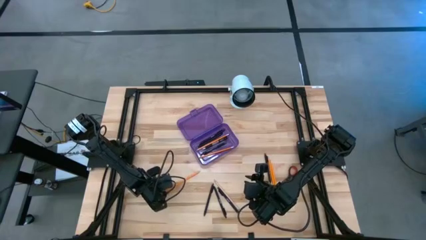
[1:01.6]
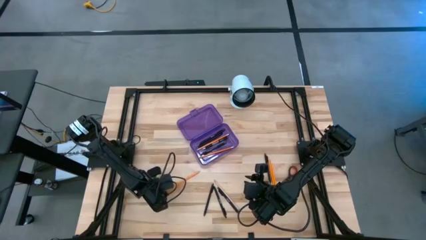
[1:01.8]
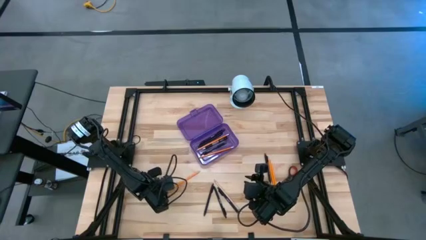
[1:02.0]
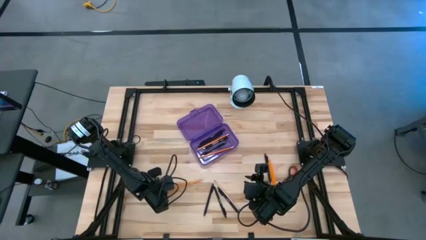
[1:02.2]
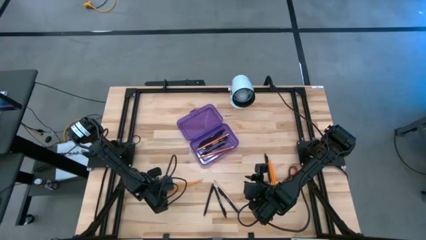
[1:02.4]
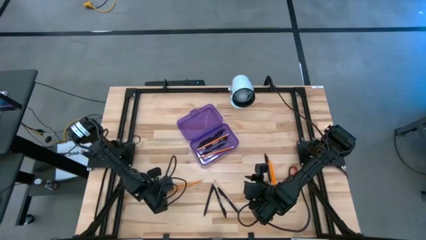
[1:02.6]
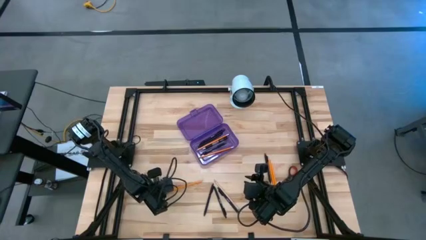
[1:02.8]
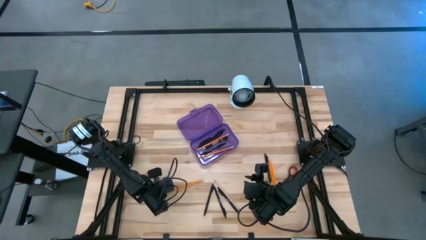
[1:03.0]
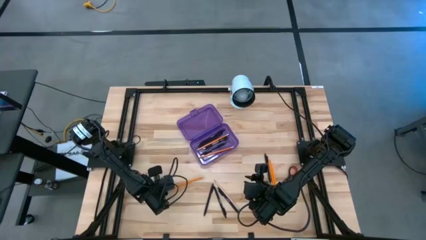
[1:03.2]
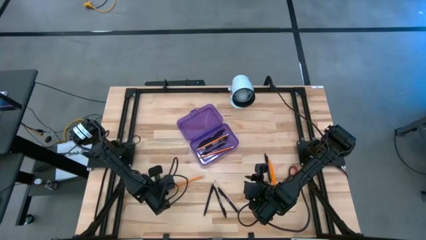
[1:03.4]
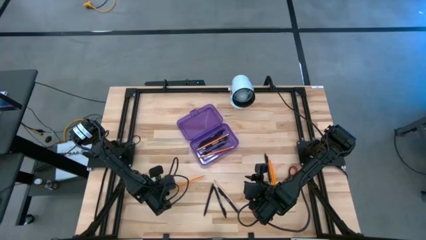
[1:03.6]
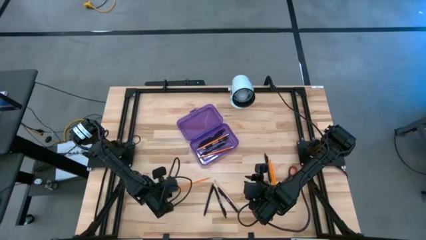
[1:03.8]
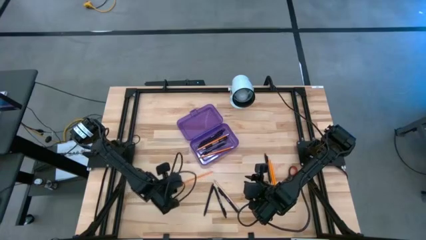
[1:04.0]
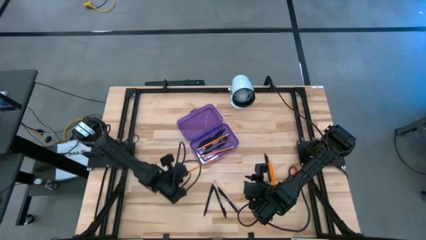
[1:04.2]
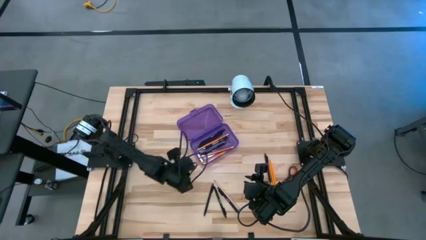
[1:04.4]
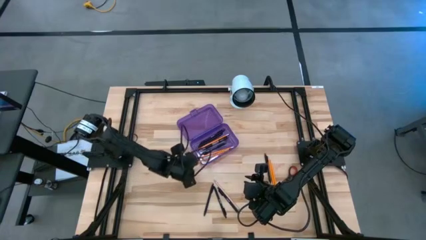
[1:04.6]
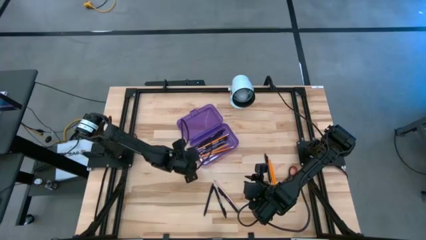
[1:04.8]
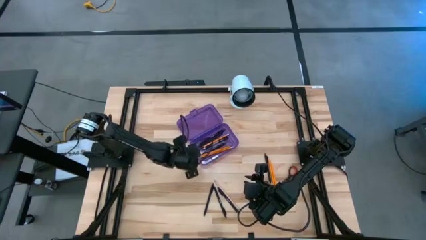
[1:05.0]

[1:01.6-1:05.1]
Task: Pick & place school supplies into a supply box
Put the orange pencil into the purple supply box

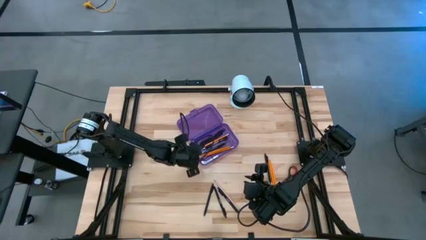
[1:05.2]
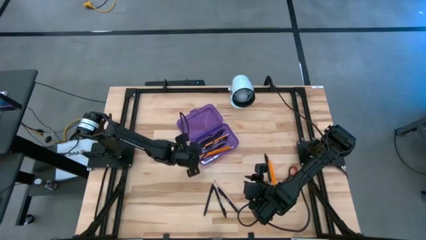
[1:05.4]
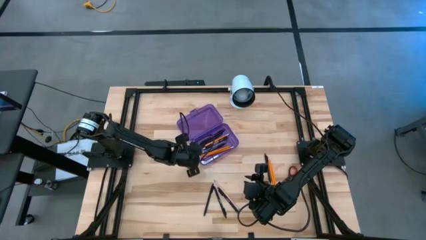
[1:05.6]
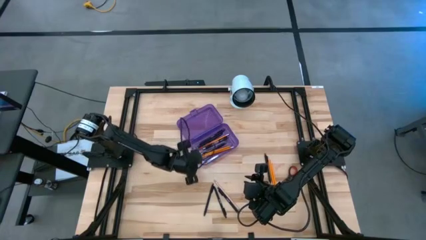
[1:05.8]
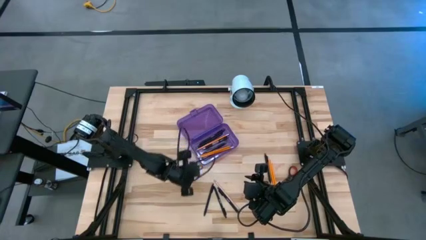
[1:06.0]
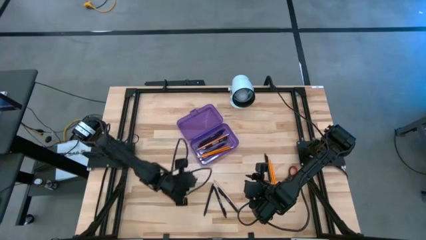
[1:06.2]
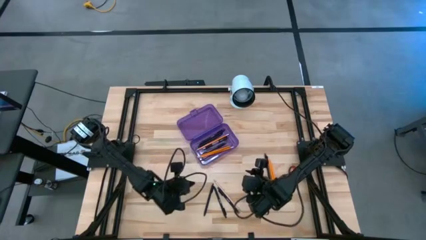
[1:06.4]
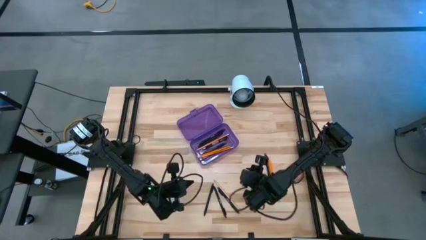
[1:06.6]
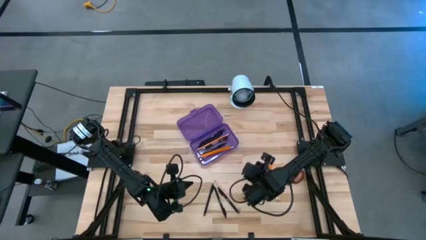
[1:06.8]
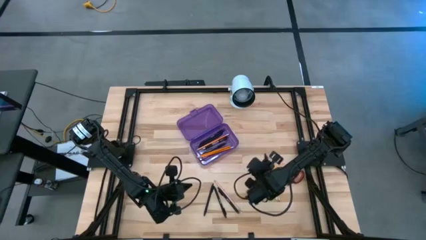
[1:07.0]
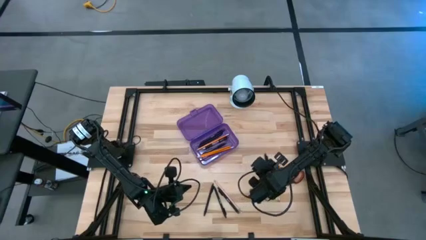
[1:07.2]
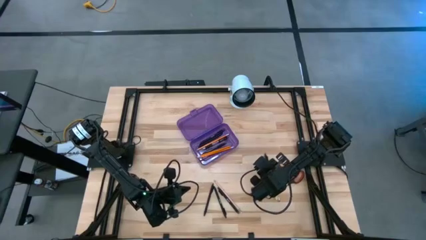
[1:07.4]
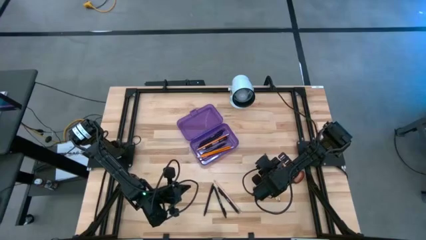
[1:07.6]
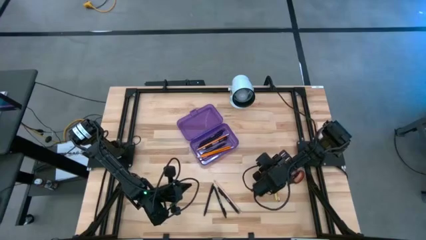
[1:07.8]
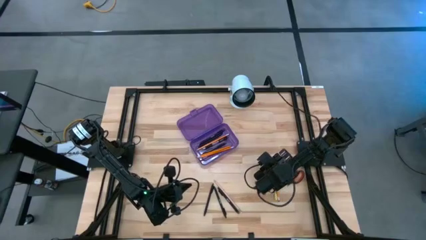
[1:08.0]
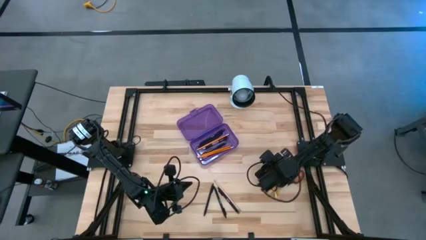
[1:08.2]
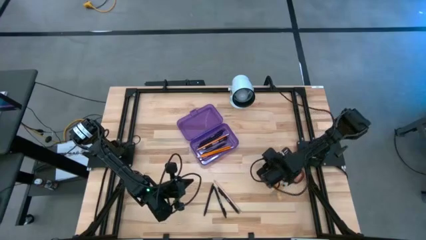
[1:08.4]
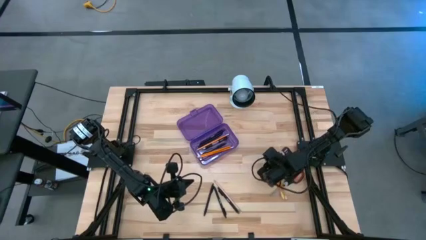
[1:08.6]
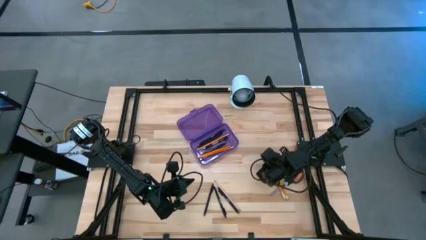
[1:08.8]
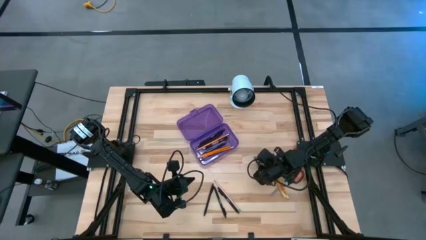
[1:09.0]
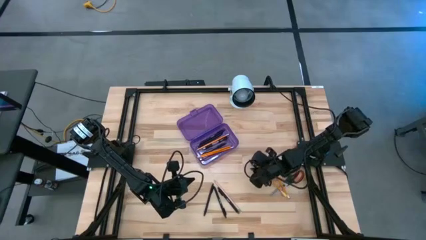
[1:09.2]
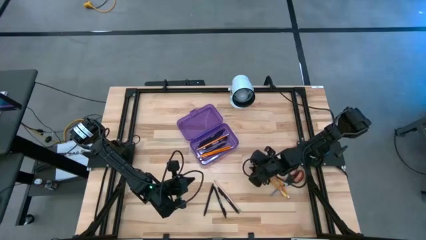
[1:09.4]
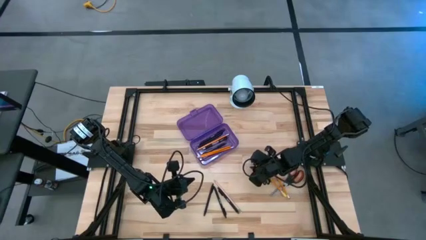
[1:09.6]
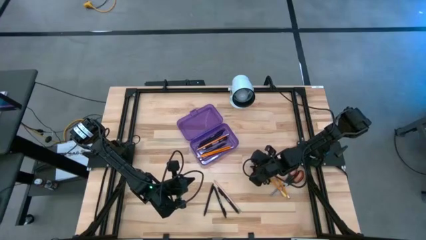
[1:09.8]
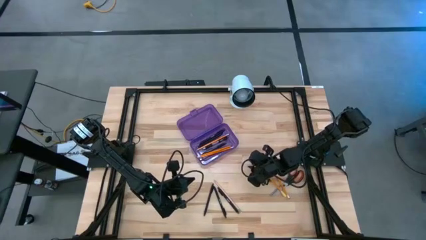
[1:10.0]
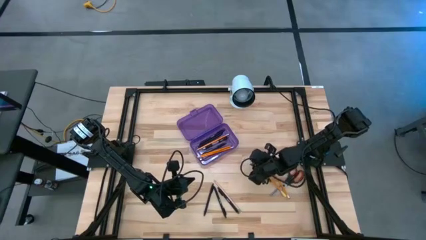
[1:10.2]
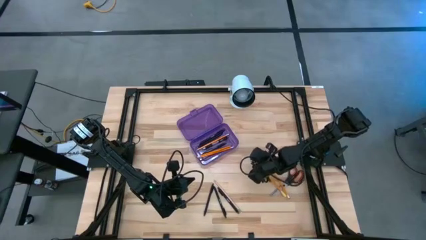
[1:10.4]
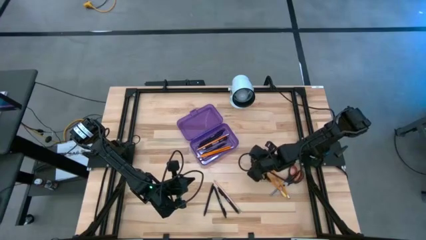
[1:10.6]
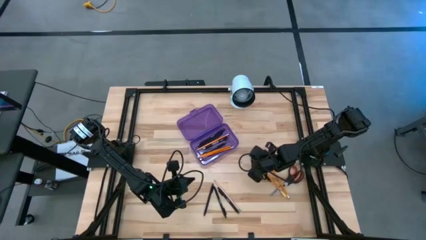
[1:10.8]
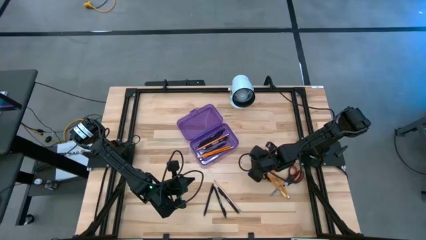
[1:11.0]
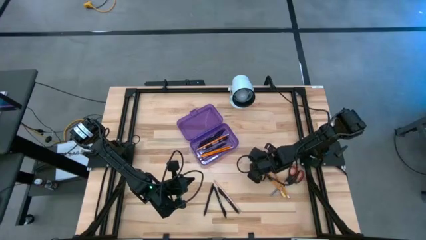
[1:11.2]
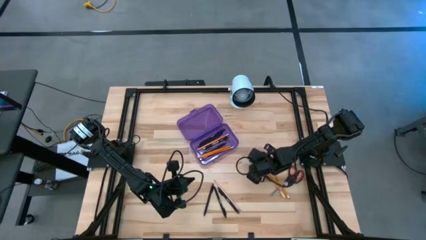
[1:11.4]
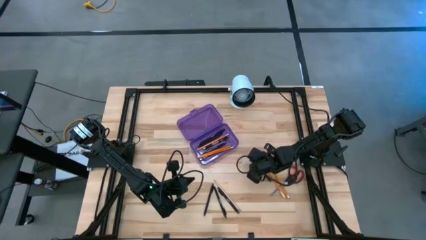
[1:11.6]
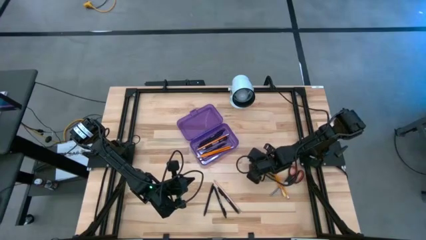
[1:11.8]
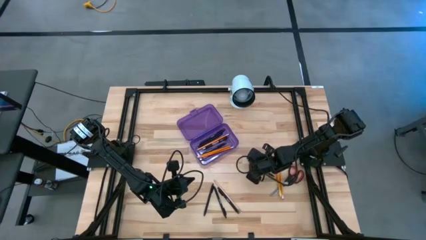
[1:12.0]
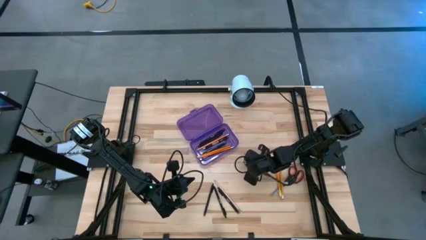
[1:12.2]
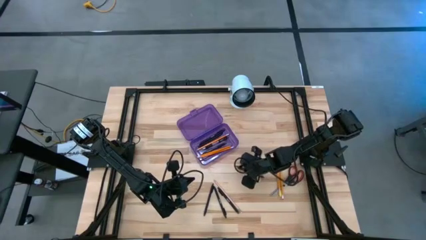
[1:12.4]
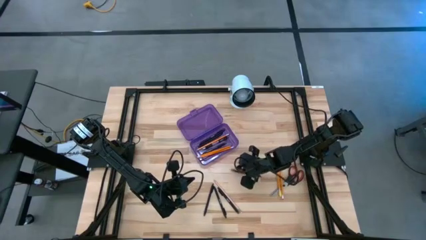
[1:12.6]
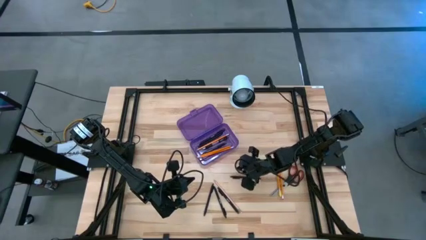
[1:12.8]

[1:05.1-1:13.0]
Put the black pen into the purple supply box

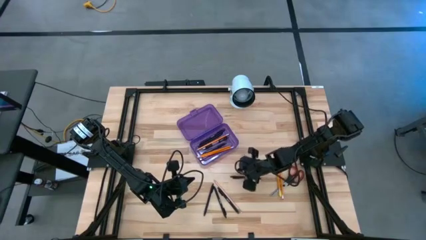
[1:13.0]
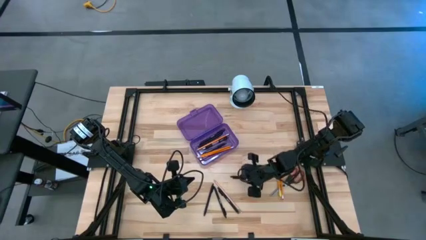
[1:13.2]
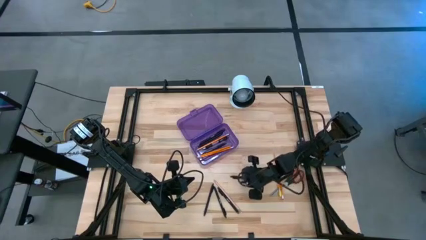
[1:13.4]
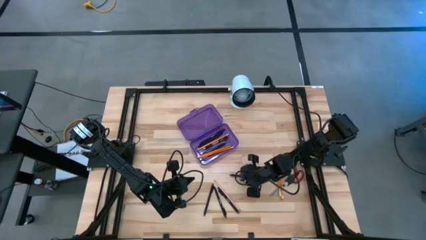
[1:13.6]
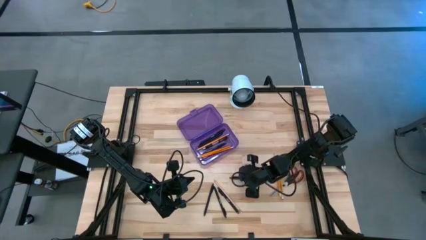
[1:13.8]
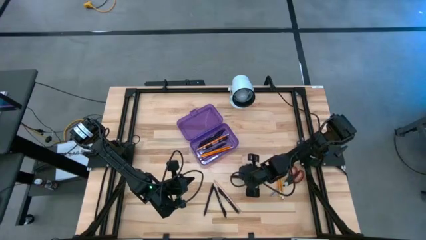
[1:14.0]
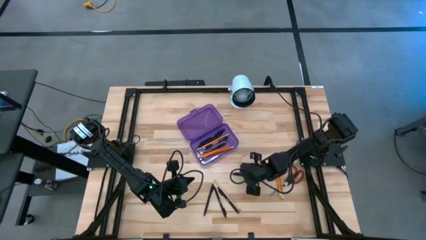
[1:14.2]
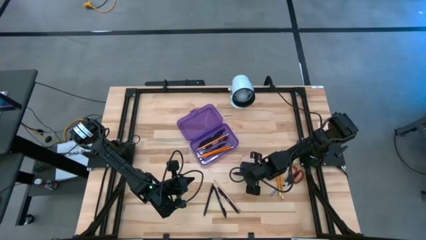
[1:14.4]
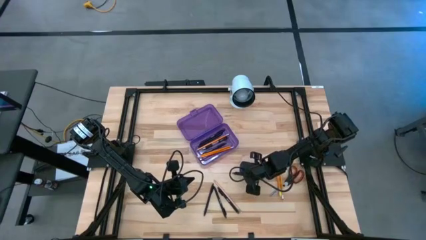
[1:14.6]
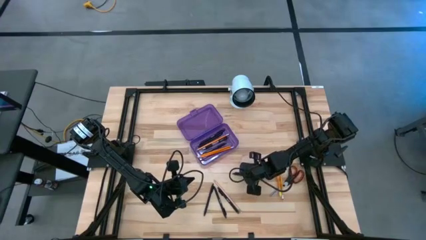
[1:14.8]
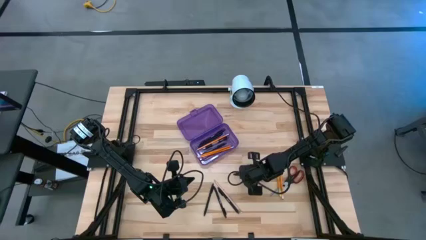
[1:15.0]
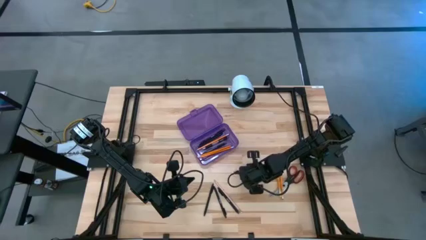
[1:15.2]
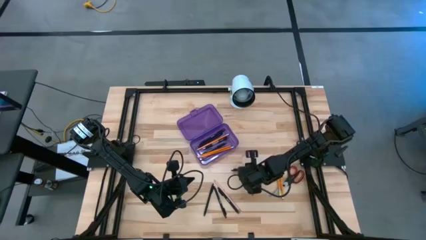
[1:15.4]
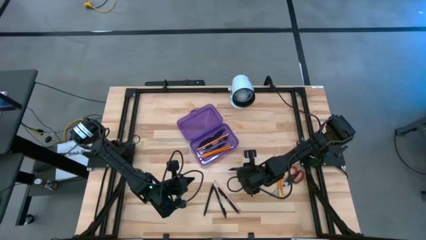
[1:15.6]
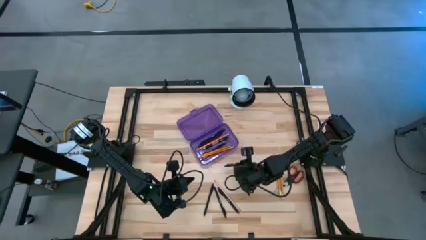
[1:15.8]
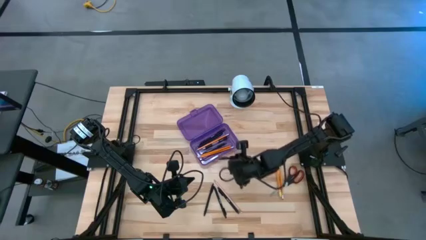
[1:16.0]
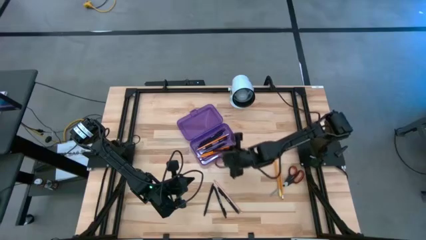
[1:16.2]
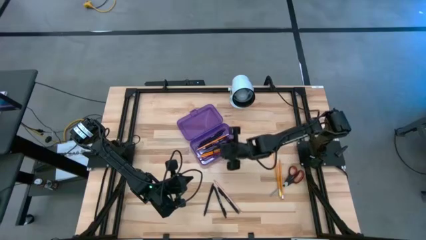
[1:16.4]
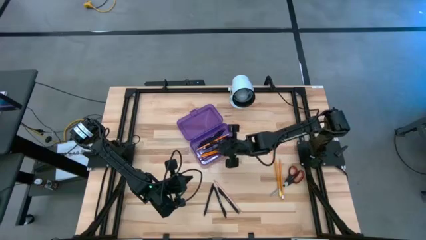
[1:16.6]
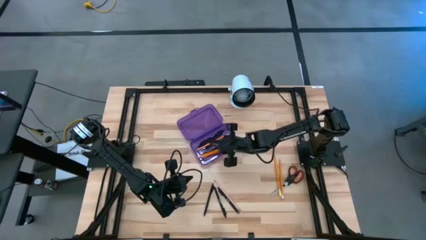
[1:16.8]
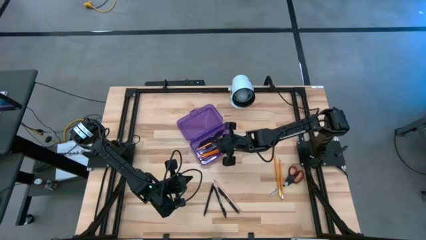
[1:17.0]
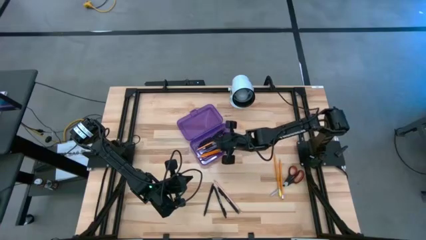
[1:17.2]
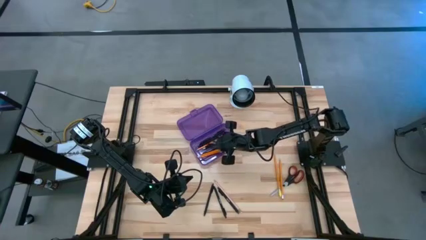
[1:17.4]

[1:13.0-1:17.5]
Put the black pen into the purple supply box

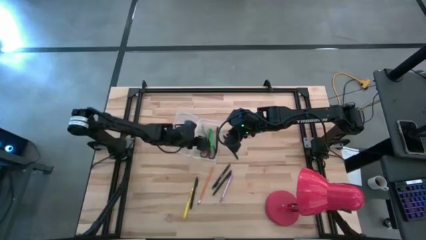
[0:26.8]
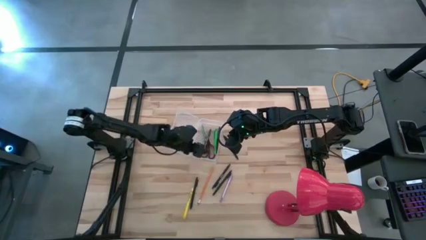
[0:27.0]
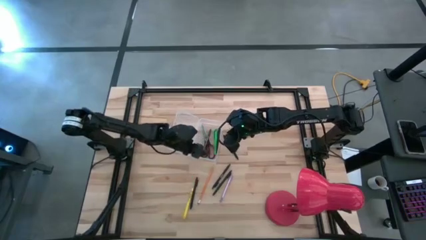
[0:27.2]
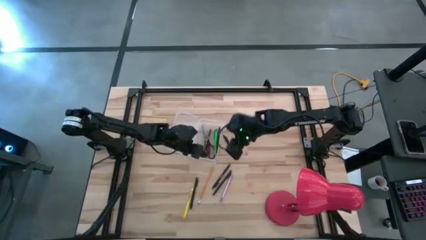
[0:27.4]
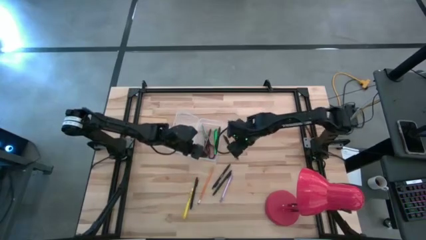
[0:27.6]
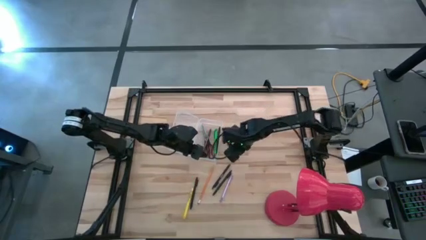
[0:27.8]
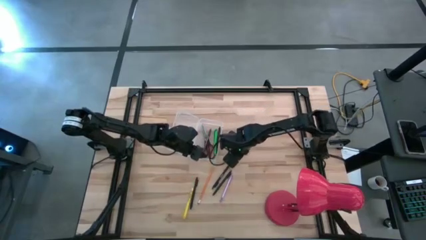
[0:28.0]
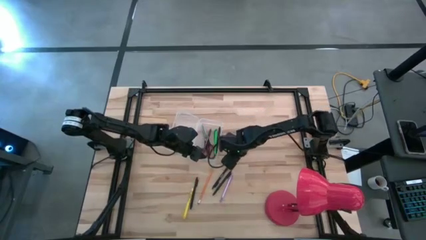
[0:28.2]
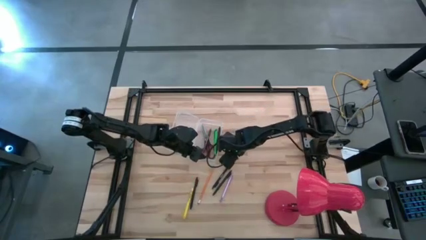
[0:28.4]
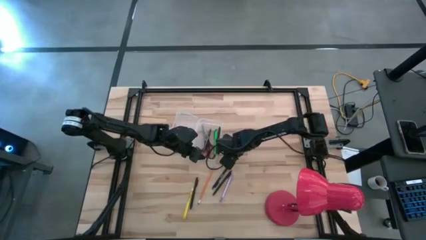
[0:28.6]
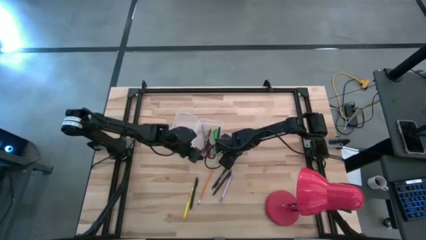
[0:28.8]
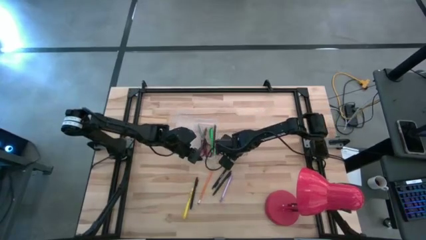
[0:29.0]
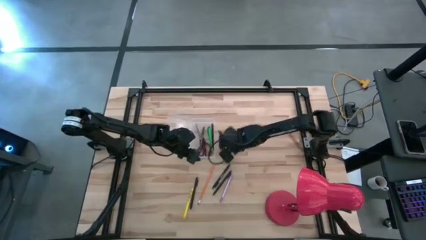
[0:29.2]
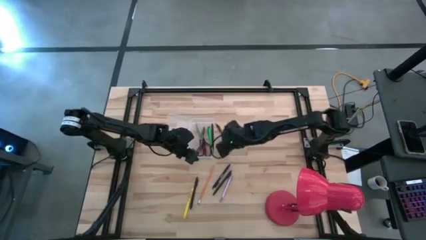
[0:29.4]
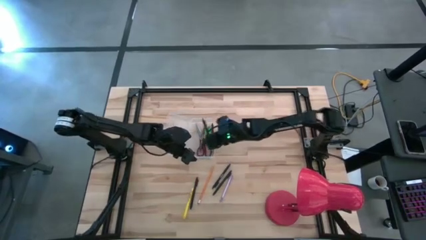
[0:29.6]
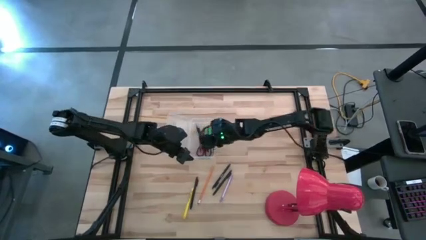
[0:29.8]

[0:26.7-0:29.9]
Task: Pick & place school supplies into a supply box
Put the black pen into the transparent supply box
